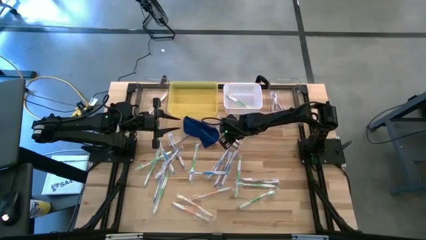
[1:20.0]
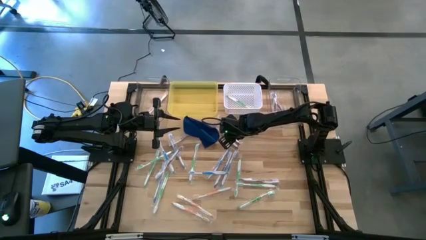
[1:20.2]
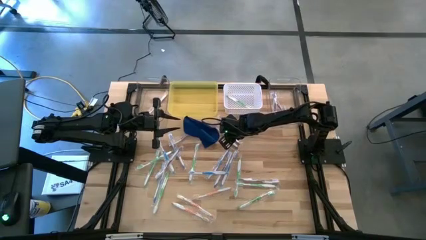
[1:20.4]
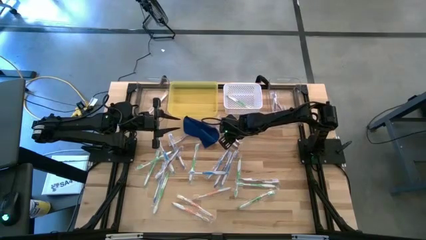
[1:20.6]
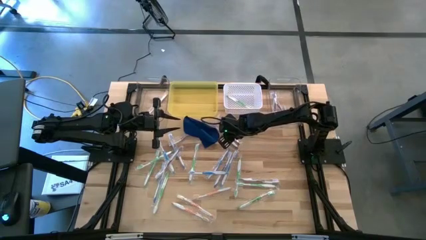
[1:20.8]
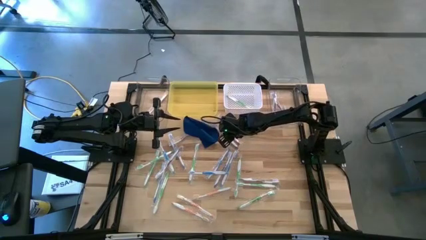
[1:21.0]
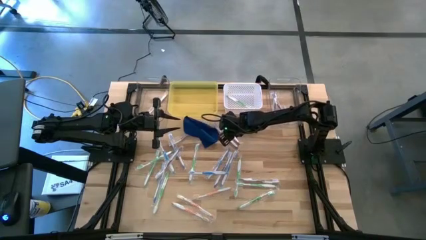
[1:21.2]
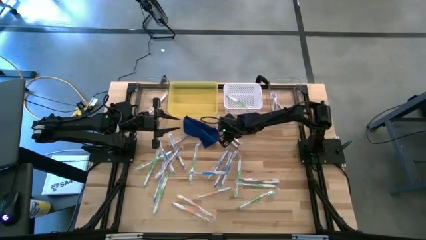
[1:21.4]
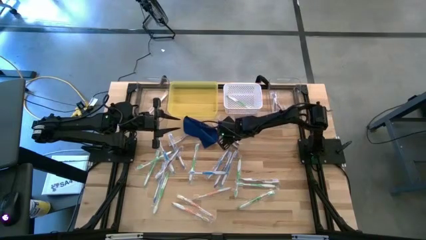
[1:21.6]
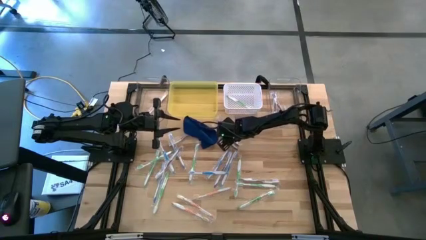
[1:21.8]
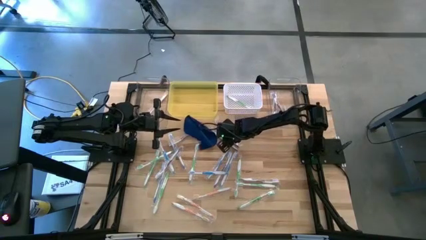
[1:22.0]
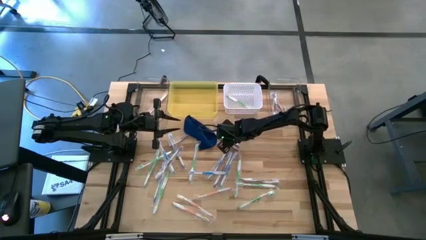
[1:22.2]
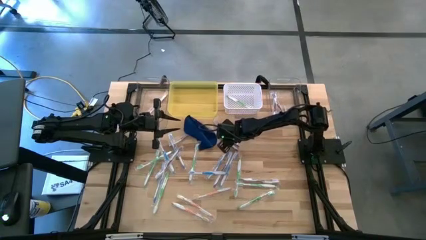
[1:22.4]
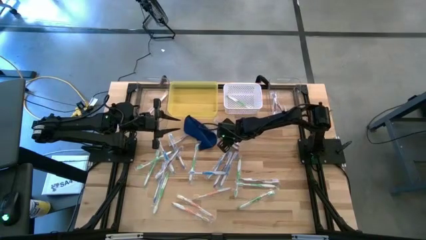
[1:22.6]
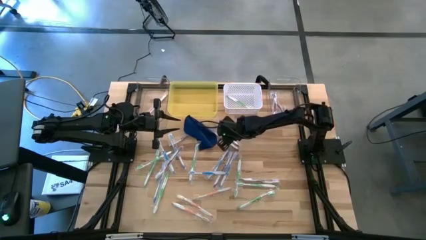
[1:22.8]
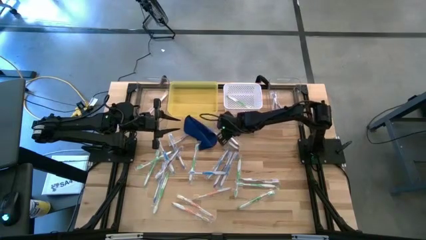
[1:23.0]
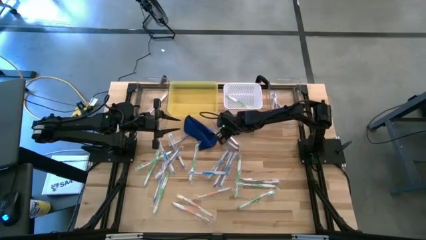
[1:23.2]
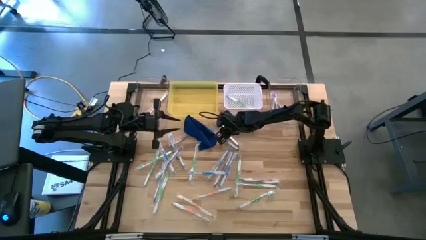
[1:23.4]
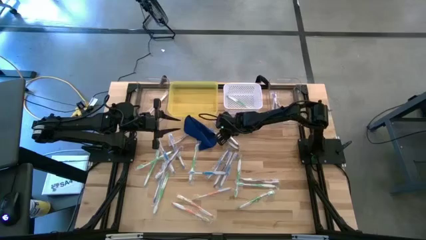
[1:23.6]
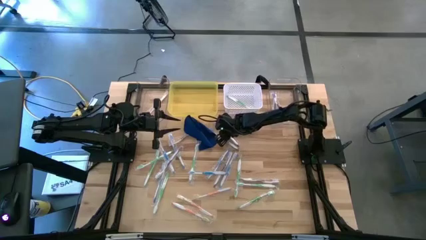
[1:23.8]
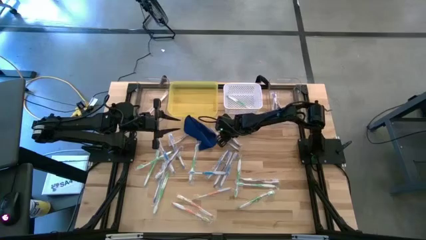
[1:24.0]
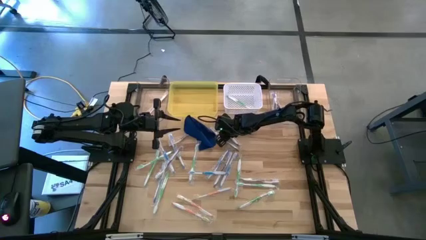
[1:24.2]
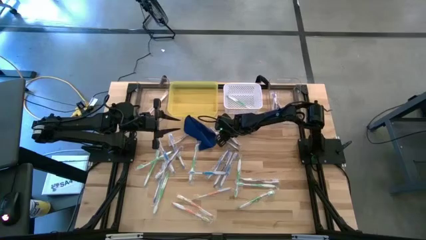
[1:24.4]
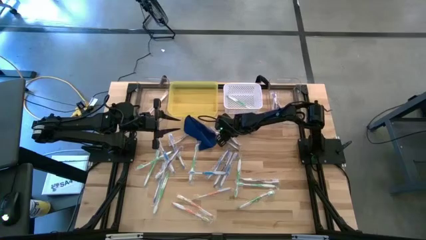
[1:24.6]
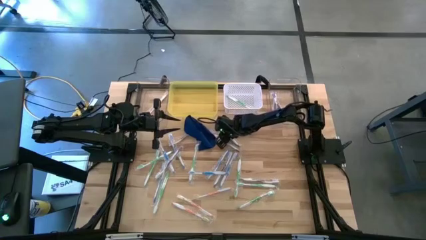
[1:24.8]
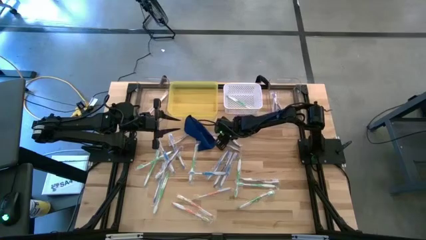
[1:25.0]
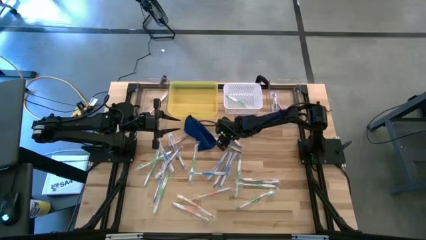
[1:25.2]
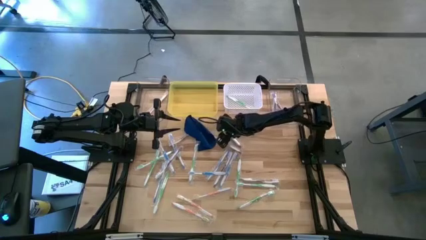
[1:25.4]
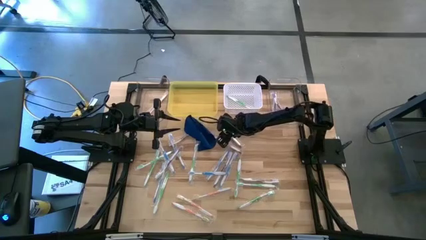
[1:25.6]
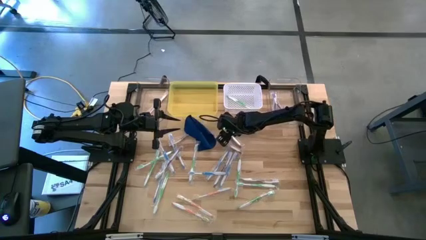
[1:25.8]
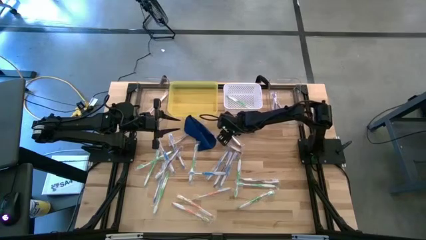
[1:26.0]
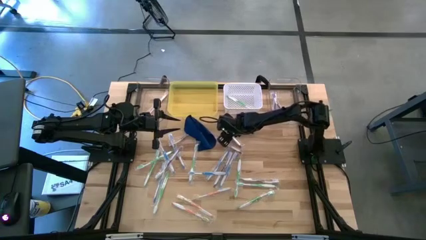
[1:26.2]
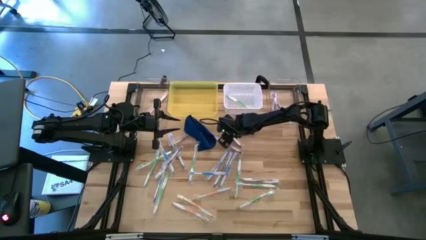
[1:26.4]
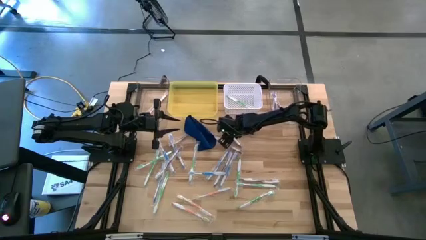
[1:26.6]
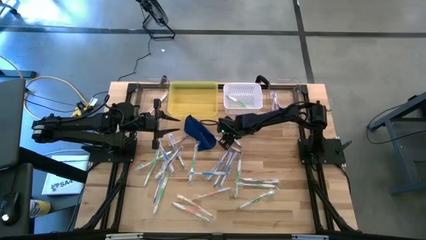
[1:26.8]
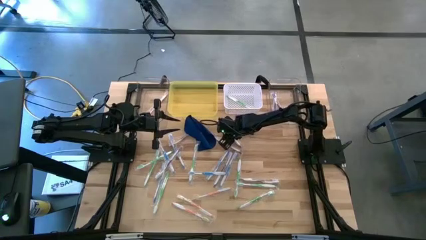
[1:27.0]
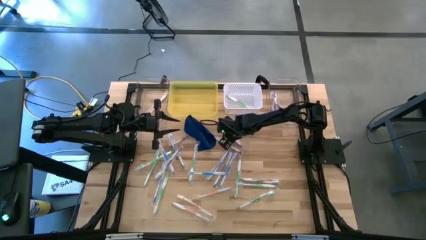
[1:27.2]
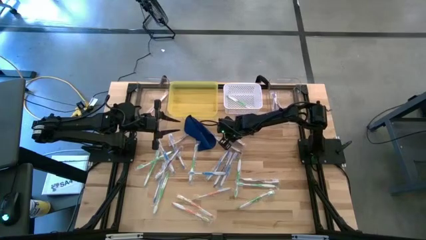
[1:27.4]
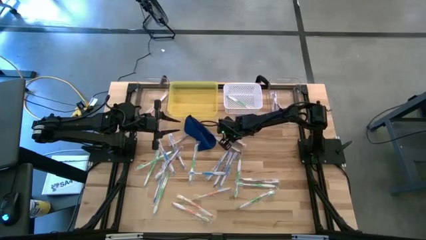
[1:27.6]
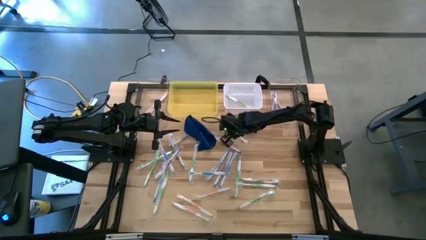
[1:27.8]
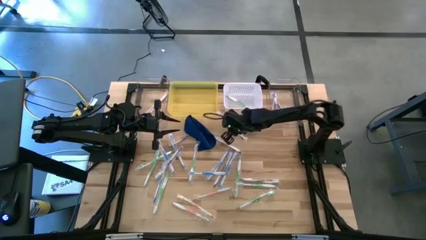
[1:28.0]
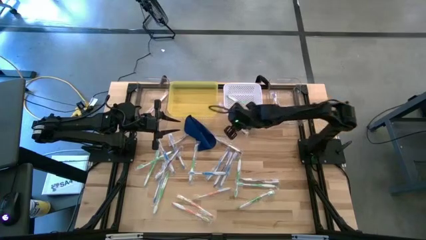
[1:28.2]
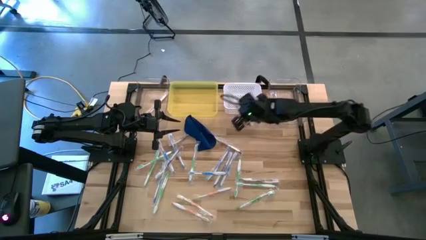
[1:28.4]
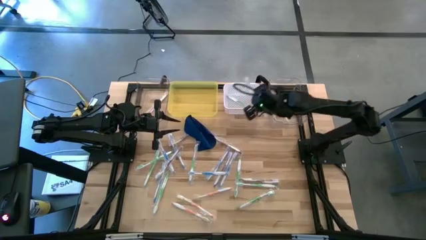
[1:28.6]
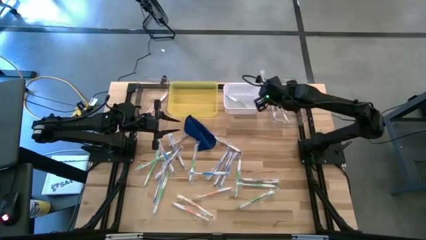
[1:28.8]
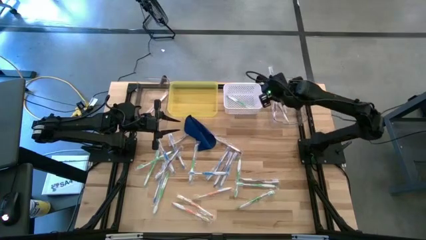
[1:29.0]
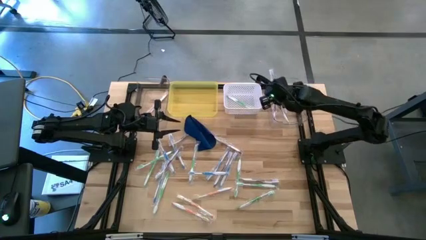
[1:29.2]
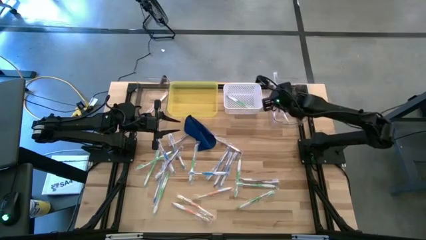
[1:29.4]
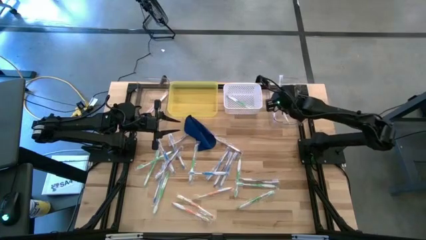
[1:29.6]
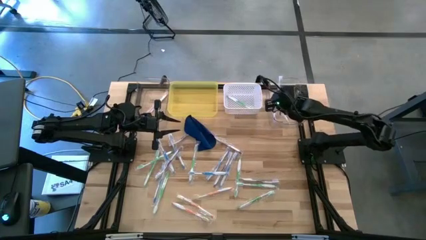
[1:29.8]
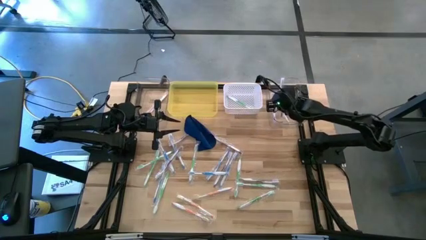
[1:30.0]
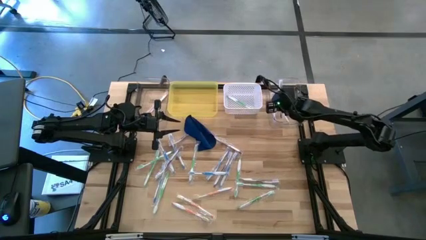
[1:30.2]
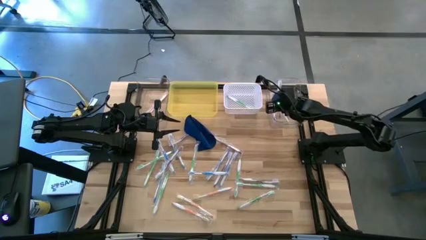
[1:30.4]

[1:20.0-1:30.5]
Task: Pick & Place Toothbrushes
Put the violet toothbrush into the right transparent bin

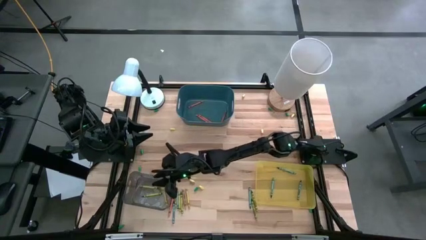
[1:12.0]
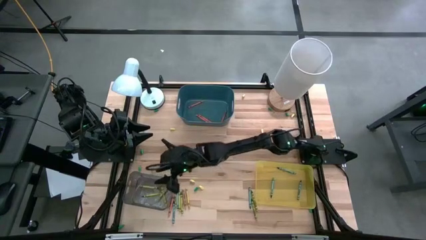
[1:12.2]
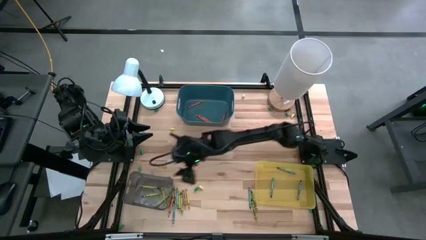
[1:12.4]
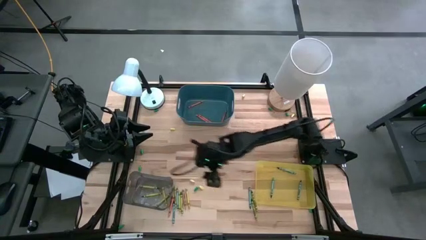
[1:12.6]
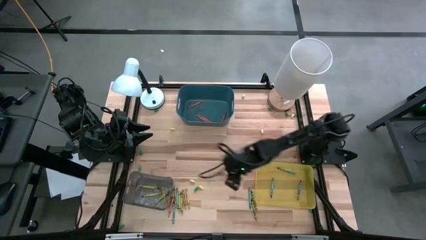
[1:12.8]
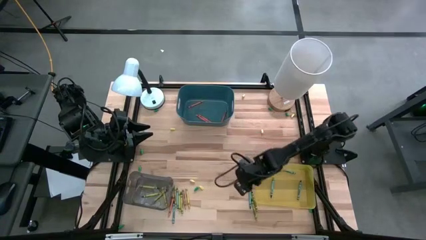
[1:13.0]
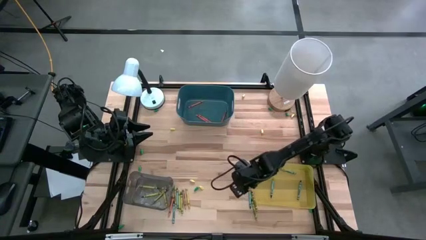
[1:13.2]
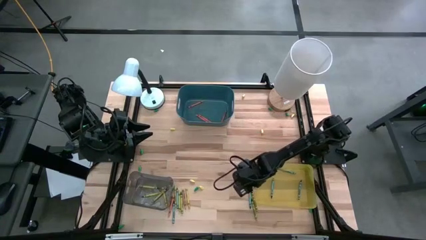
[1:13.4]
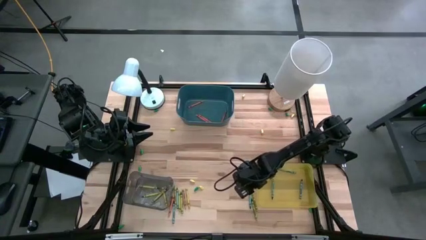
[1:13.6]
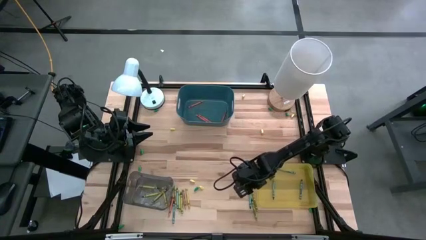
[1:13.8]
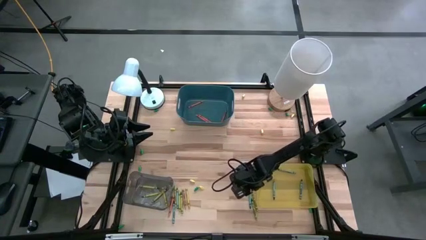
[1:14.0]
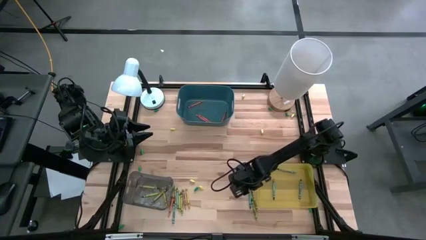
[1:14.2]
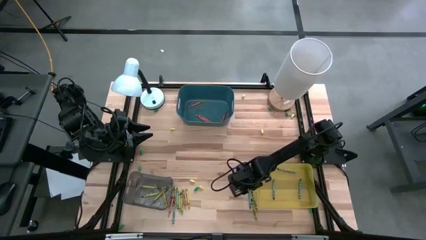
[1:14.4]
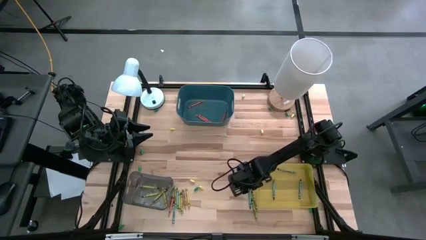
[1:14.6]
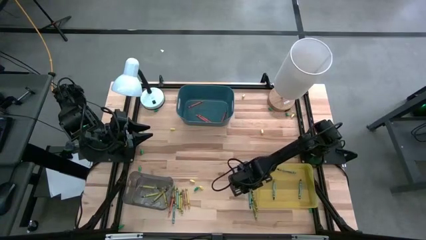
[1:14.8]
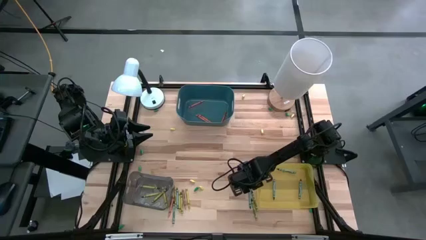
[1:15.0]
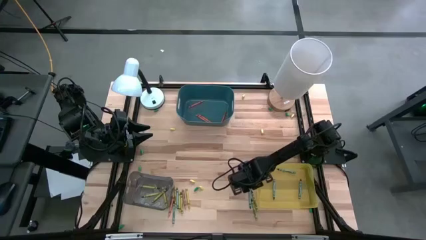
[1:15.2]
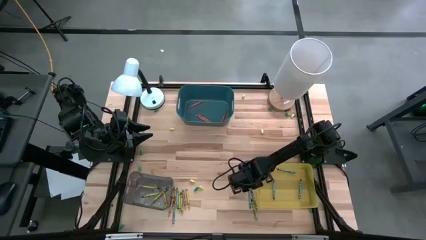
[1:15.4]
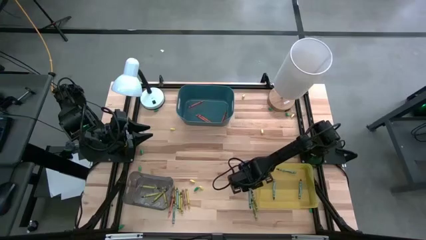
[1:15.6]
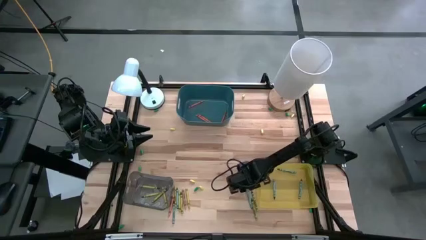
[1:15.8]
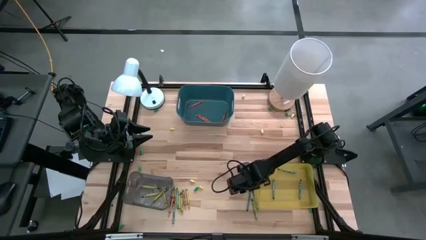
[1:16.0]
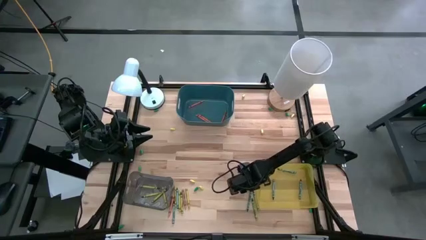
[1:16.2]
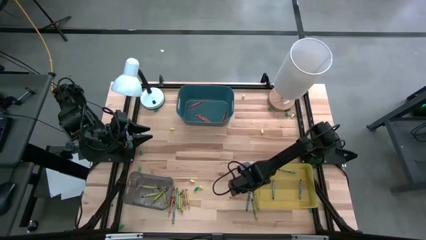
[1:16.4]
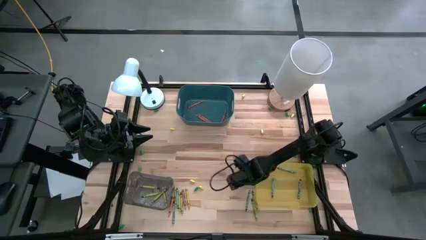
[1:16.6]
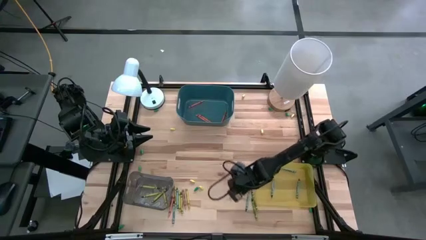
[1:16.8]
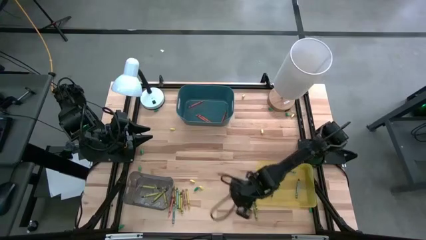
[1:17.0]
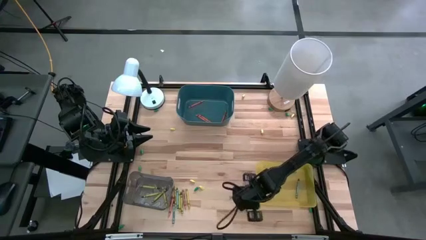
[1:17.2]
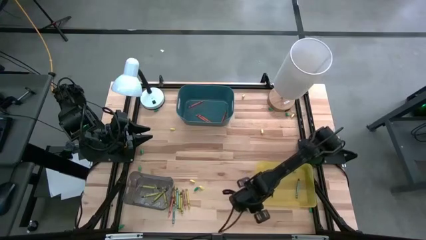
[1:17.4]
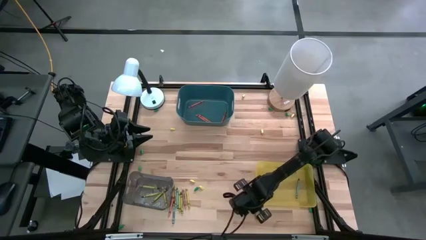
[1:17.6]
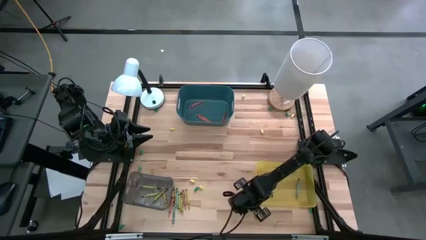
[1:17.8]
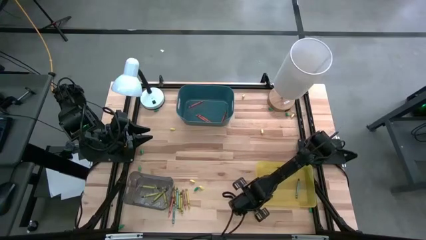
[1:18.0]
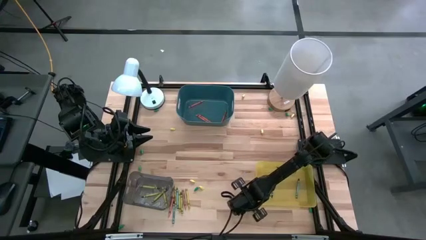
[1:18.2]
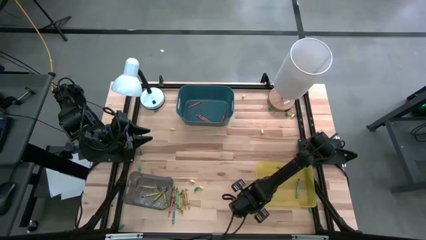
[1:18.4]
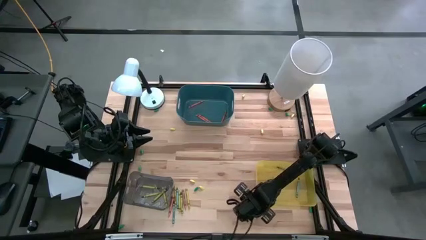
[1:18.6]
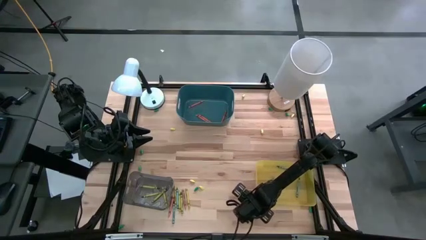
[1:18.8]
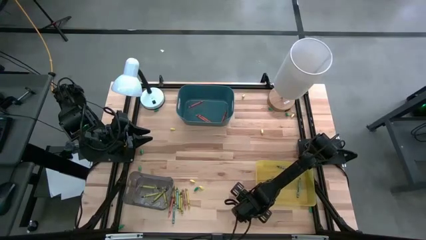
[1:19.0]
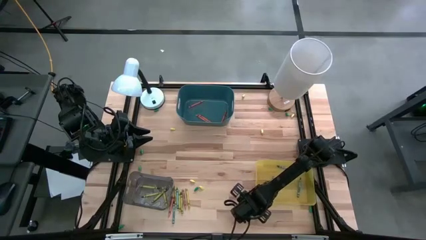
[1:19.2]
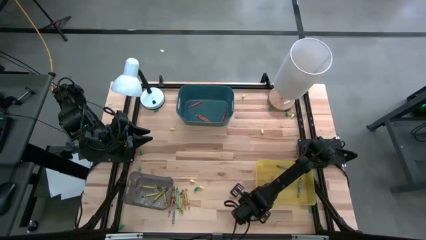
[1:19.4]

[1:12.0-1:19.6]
Task: Sort crayons
Put the right blue crayon into the yellow bin

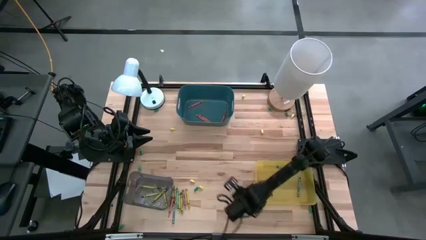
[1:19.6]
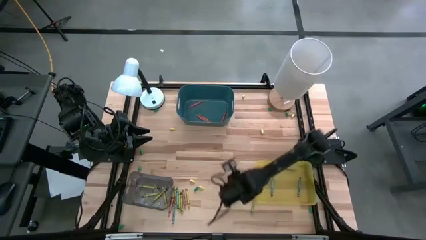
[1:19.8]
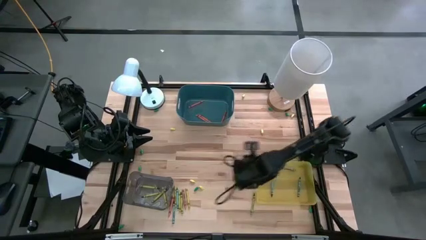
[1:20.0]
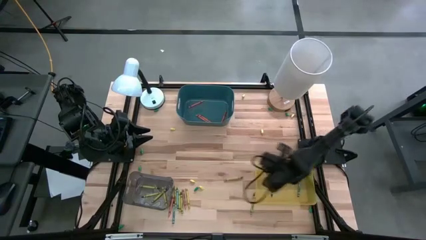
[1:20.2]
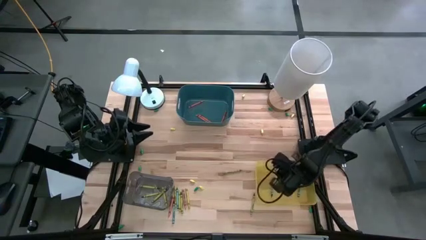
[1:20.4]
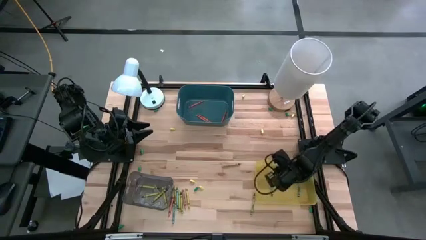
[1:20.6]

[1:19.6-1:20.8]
Put the right blue crayon into the yellow bin
